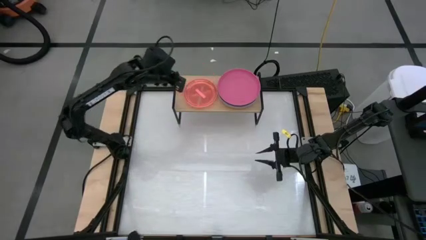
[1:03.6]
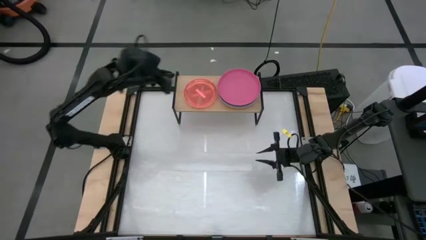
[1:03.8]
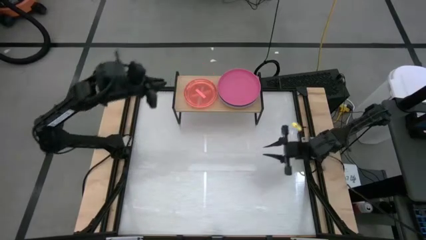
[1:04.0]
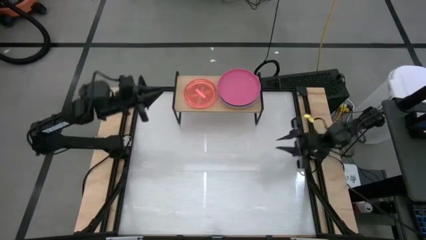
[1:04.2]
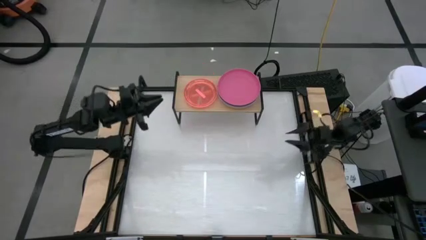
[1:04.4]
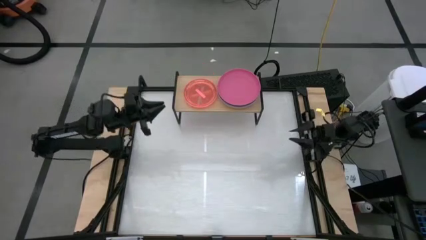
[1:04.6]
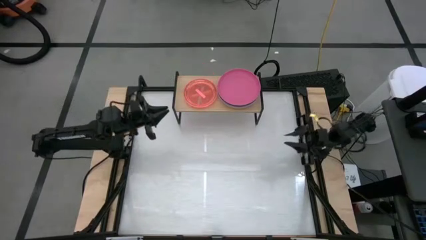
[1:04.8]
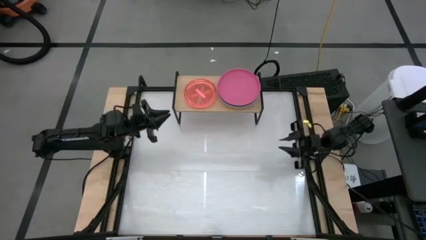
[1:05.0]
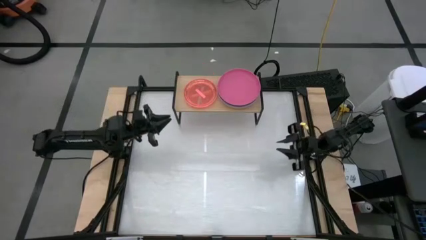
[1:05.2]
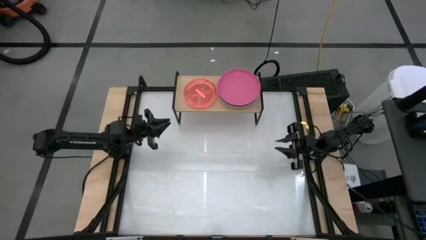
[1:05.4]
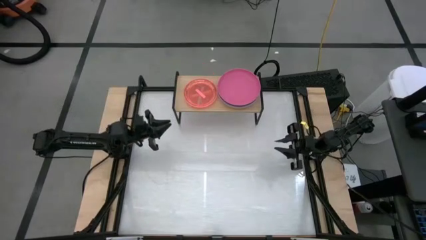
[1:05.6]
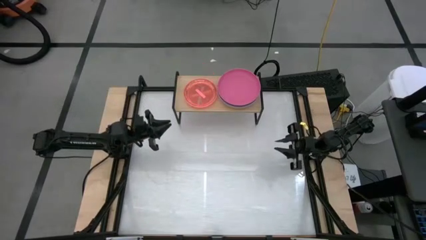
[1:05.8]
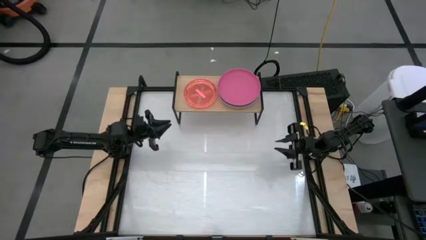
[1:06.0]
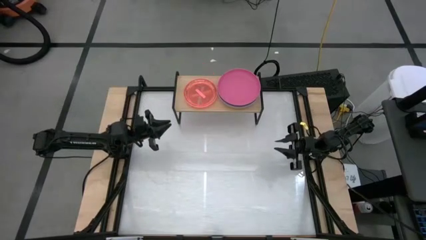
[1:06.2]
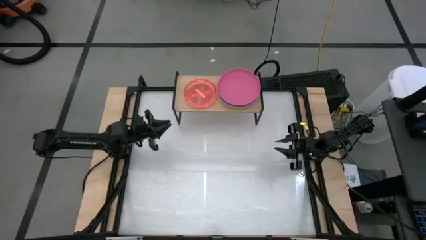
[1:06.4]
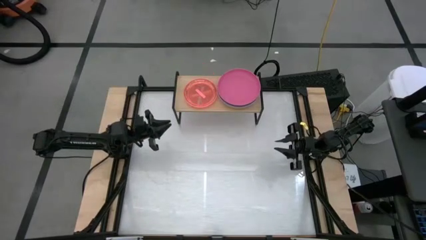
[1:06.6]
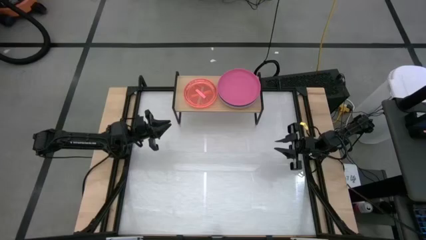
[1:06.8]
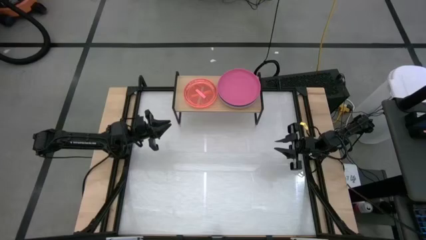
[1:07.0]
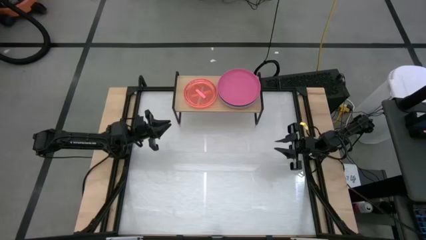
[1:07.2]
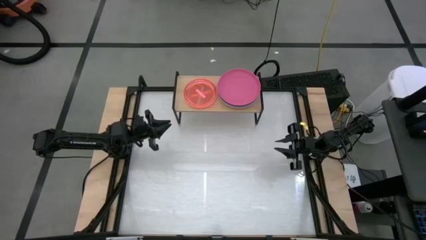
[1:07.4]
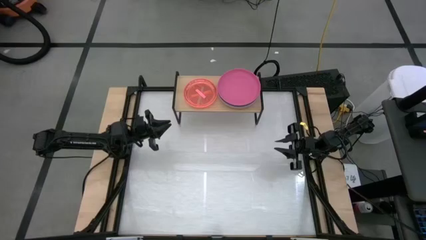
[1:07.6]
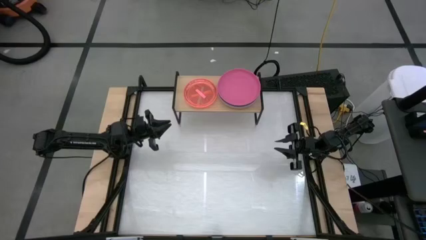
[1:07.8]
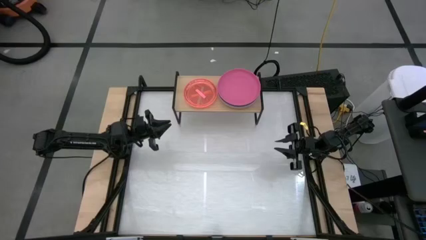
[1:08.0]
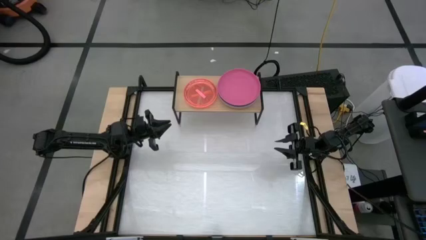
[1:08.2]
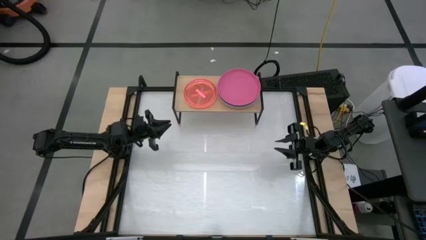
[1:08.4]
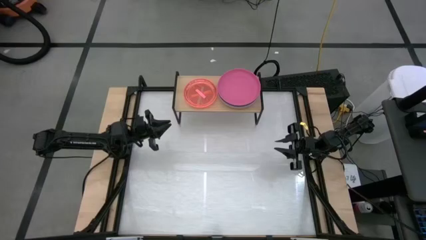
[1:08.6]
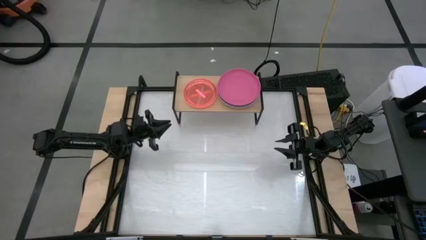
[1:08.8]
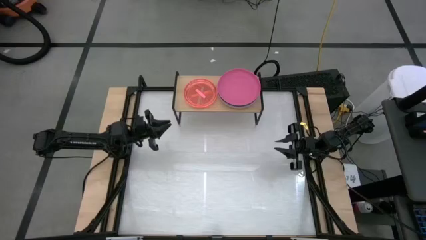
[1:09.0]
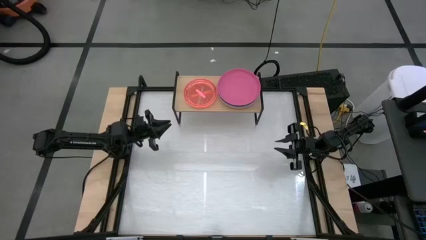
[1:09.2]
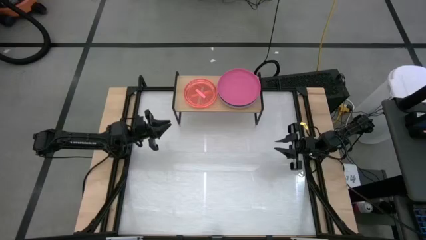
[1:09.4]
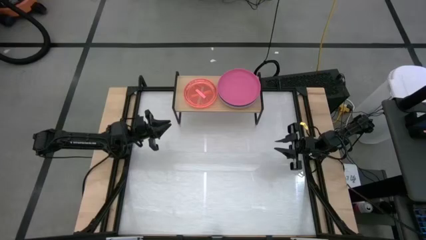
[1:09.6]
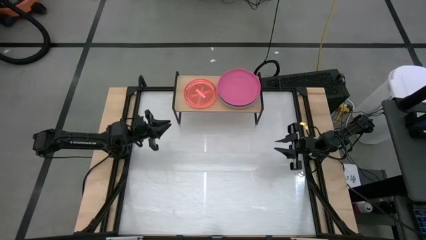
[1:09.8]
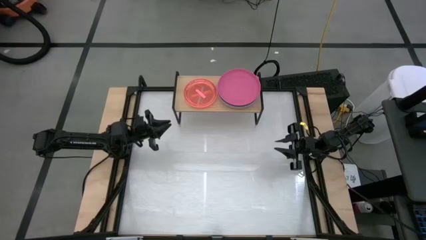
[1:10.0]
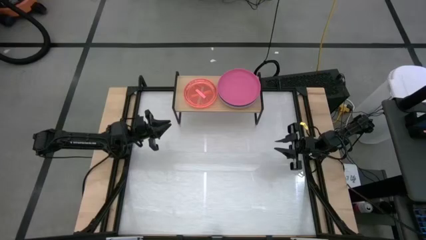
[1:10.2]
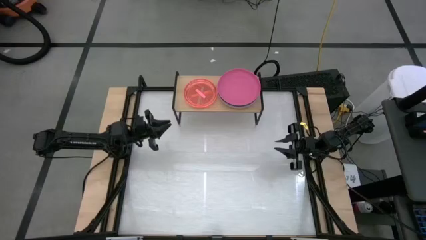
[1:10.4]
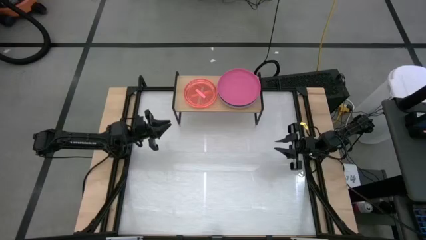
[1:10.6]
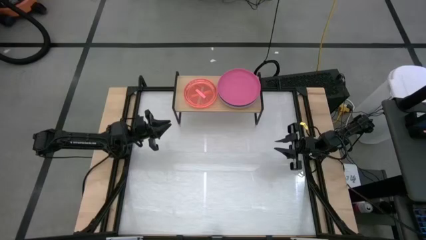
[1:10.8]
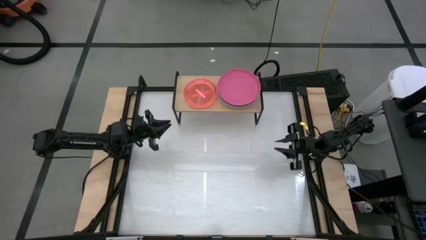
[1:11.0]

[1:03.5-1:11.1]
Task: Place and stack plates onto a shelf
Return to Home Position

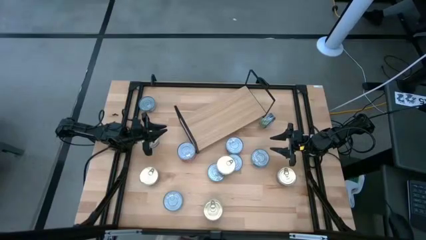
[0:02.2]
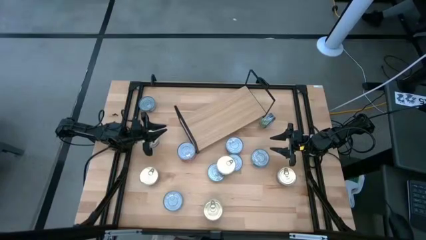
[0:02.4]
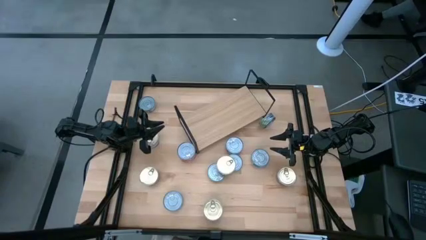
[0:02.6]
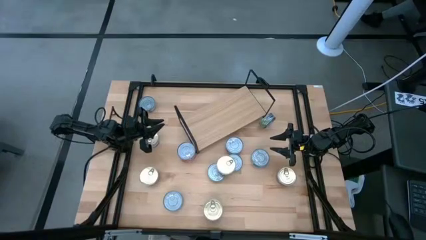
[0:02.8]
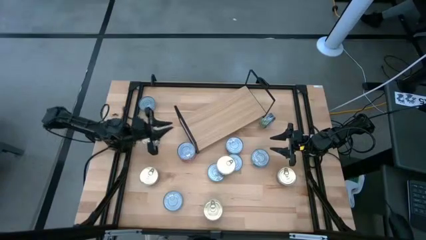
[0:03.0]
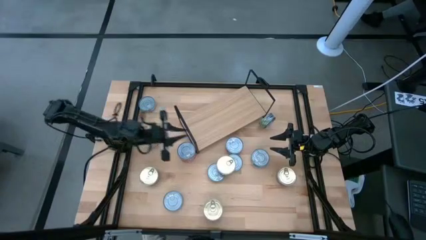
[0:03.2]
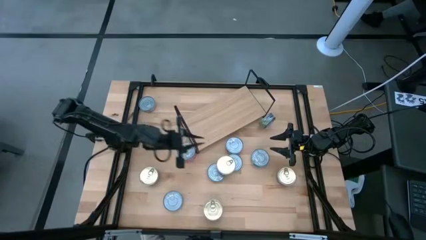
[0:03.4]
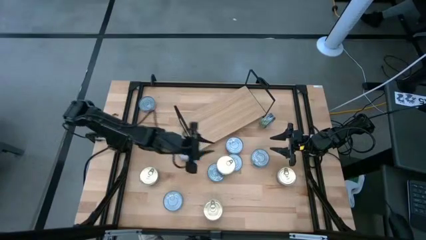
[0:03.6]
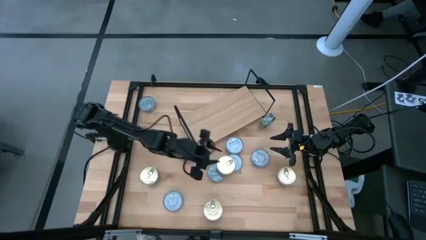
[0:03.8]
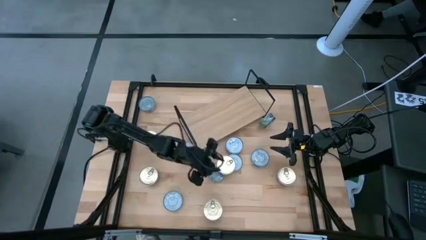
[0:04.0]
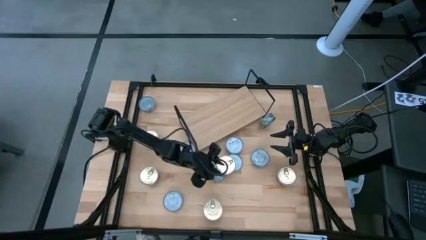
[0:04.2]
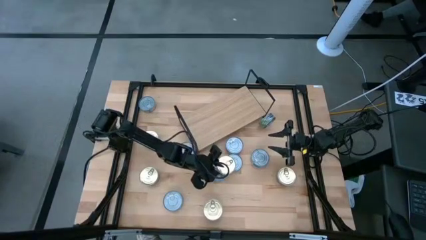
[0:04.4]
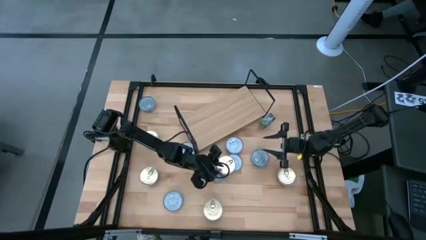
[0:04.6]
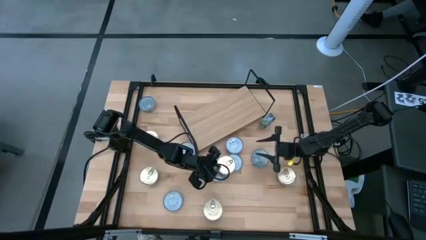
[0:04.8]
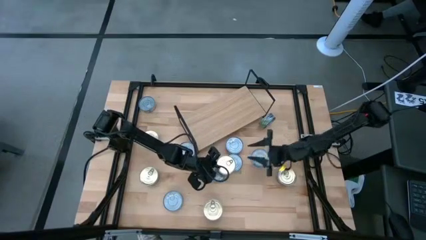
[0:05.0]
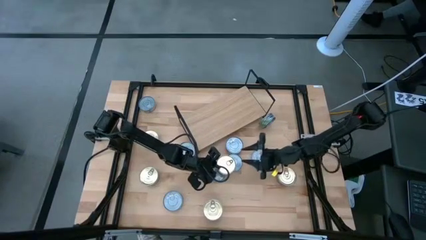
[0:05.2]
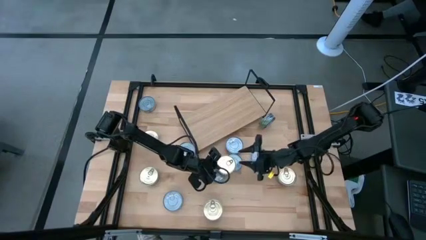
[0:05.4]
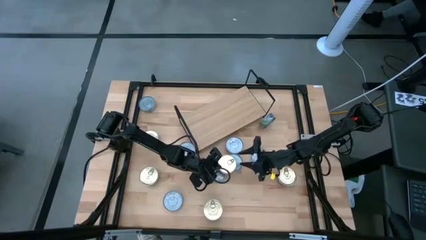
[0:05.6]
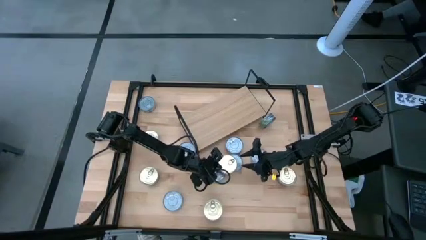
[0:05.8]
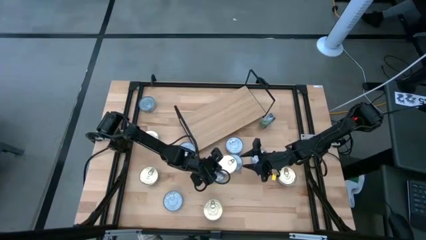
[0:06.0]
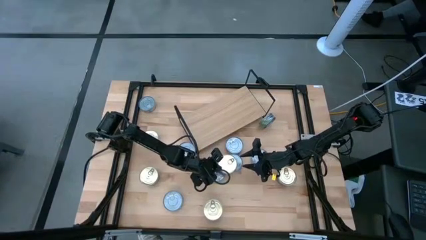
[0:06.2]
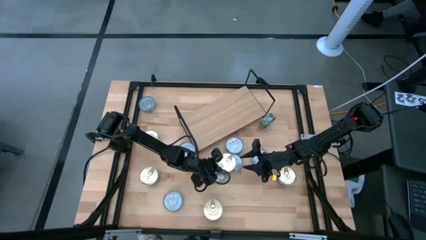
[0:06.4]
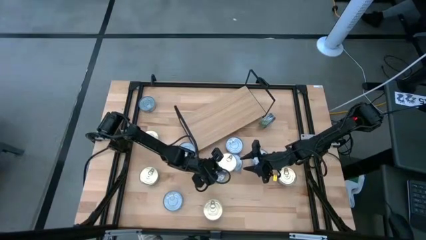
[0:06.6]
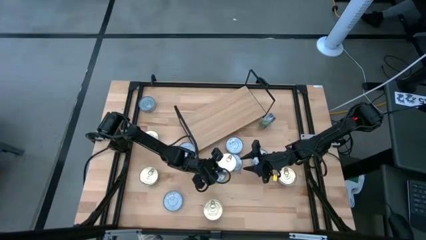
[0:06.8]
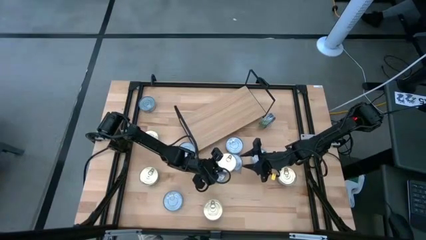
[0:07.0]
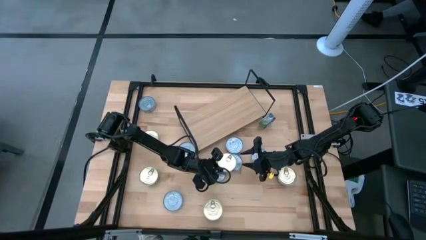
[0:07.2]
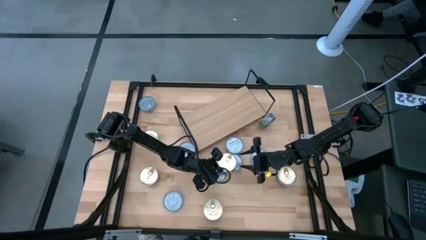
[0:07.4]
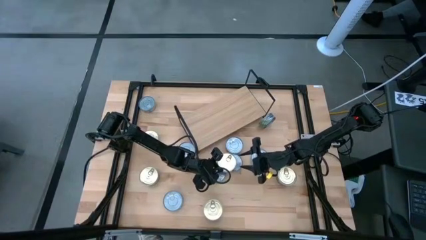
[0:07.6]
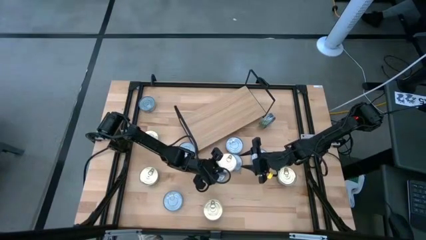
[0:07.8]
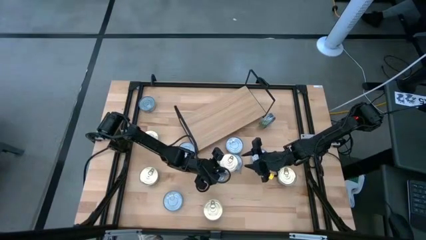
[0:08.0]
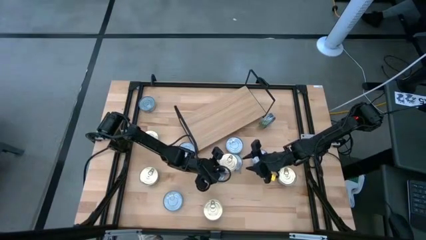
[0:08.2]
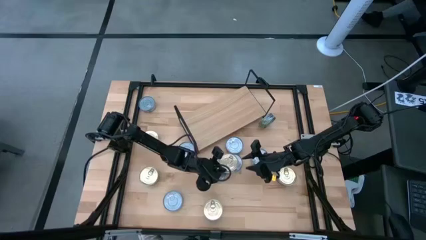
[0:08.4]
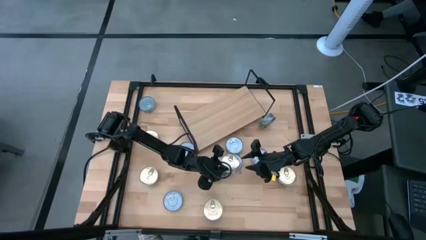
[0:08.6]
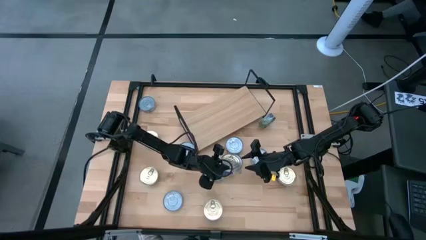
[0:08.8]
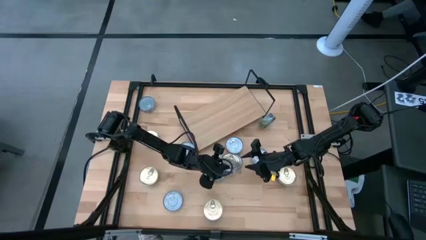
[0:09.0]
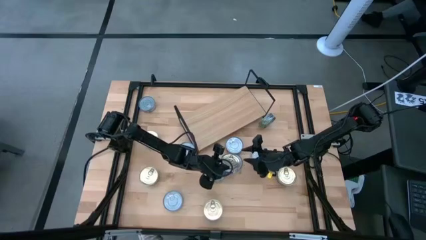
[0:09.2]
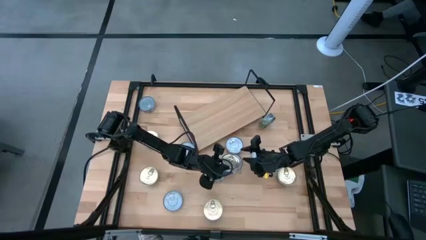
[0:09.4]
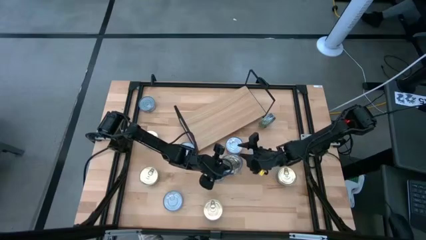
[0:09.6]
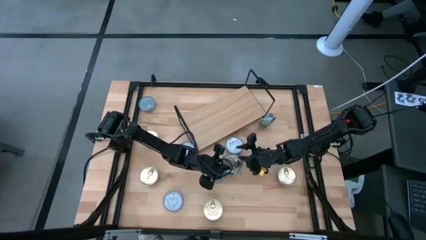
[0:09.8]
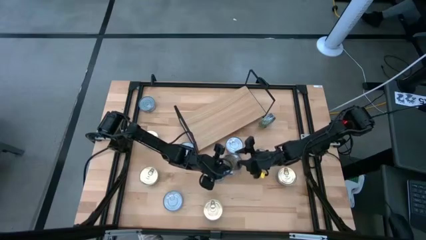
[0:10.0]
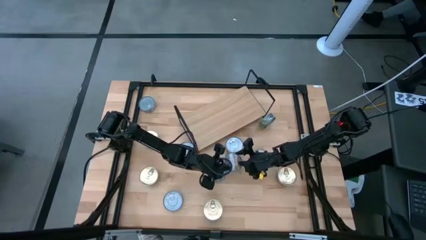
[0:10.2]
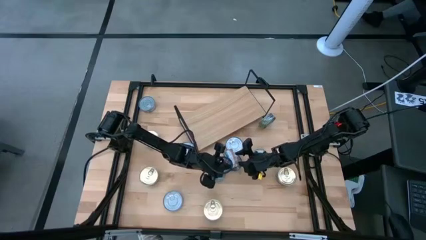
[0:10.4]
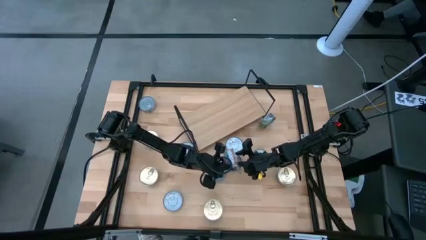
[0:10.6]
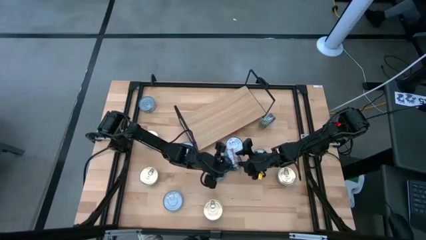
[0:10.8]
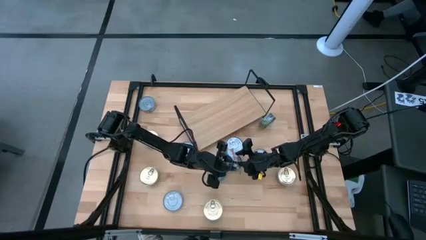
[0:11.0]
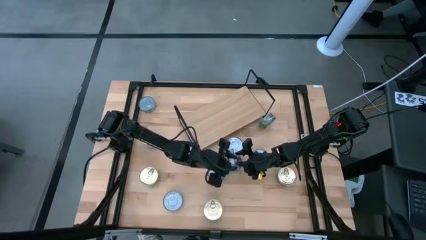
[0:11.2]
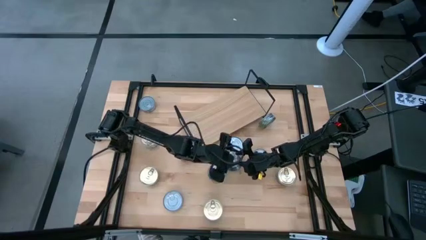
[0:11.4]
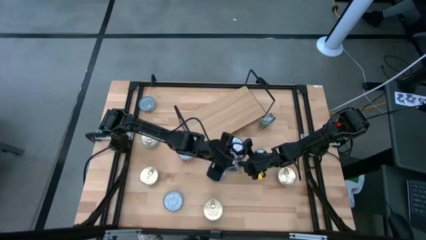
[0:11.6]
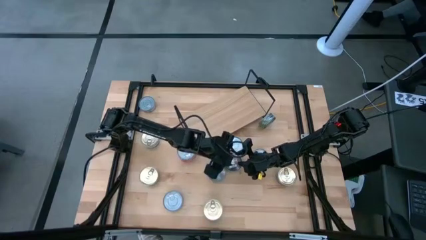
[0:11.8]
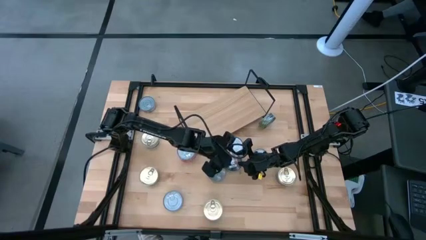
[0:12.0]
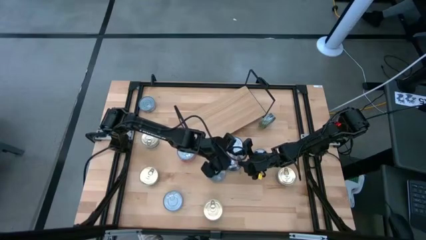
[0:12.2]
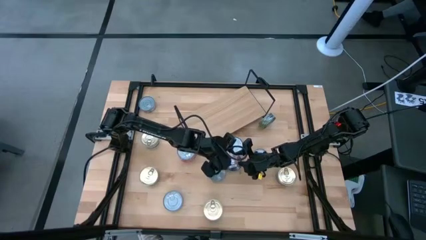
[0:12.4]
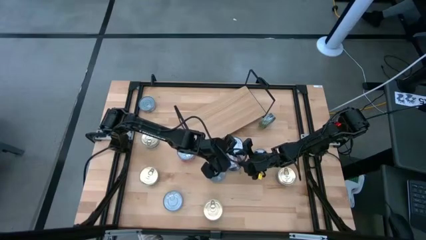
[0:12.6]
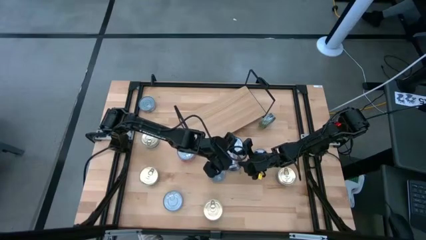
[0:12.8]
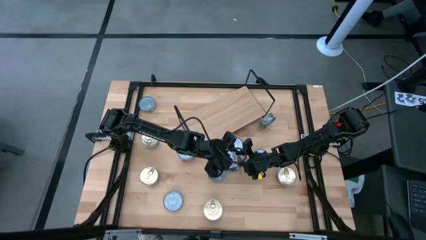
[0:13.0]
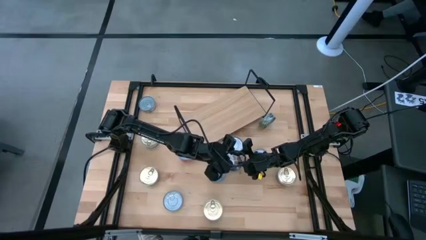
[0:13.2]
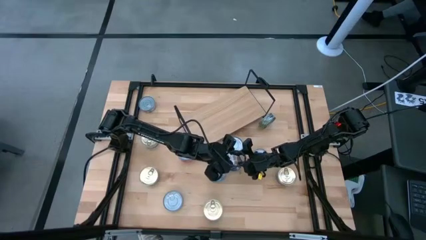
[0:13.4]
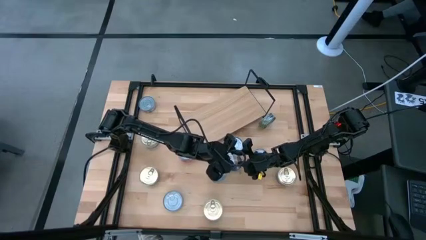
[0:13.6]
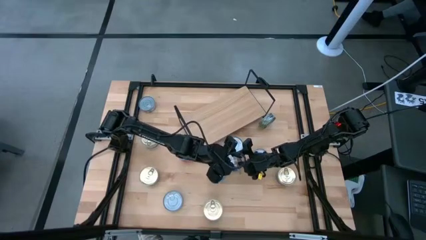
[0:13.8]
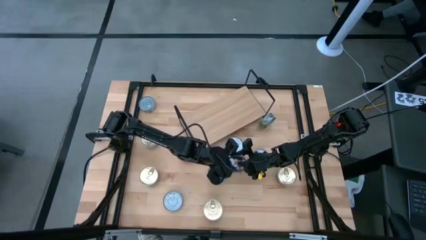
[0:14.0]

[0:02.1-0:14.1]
Task: Stack canned seafood by type on shelf
Put the blue and pink tuna can on the shelf
